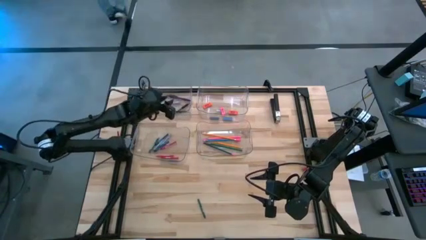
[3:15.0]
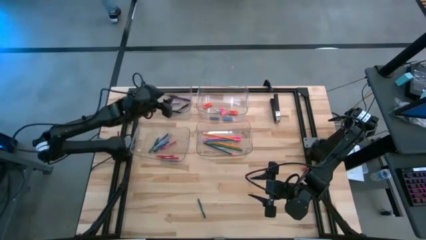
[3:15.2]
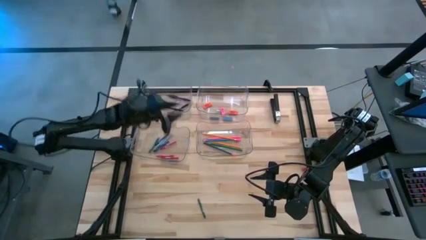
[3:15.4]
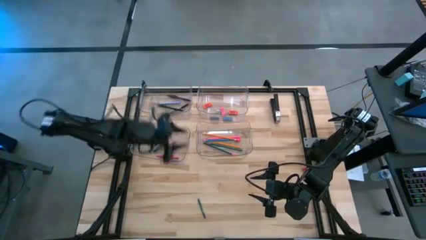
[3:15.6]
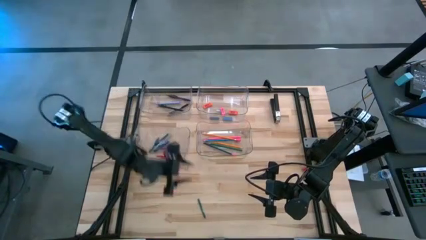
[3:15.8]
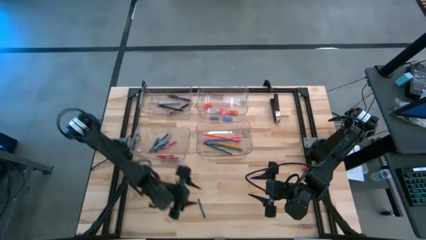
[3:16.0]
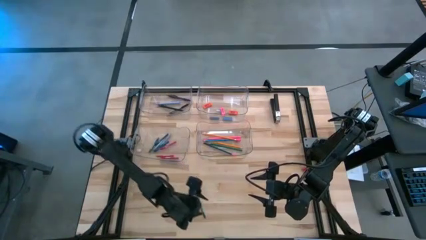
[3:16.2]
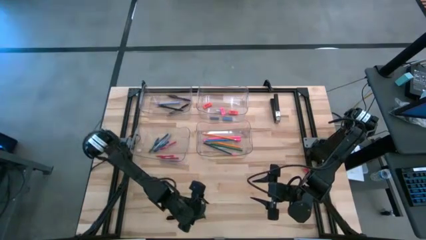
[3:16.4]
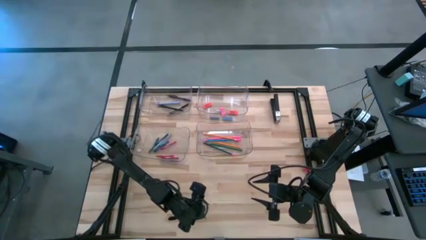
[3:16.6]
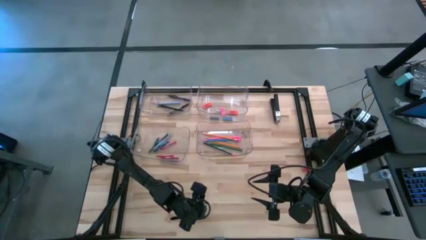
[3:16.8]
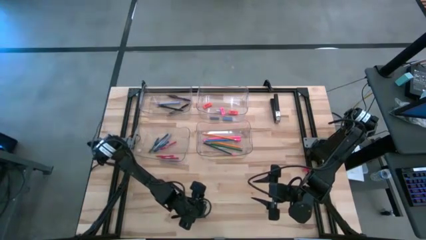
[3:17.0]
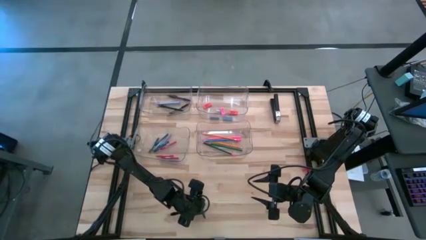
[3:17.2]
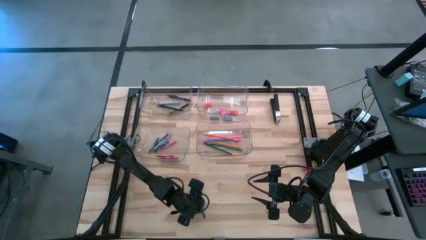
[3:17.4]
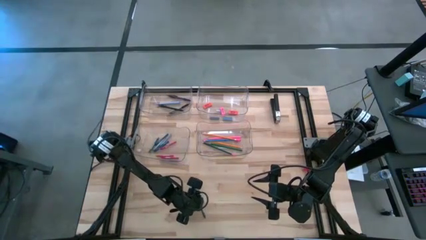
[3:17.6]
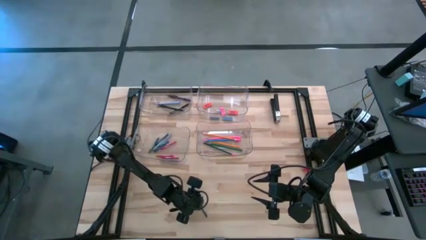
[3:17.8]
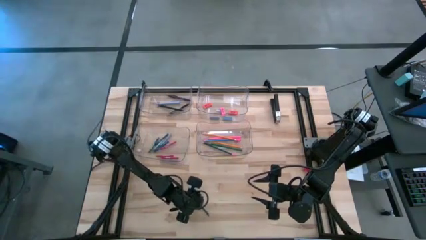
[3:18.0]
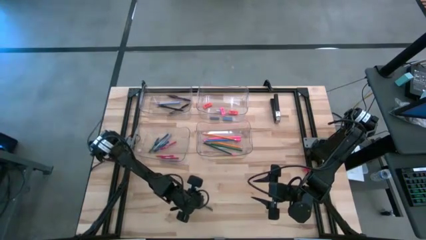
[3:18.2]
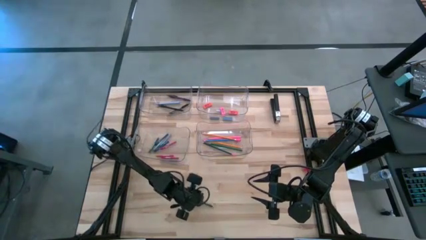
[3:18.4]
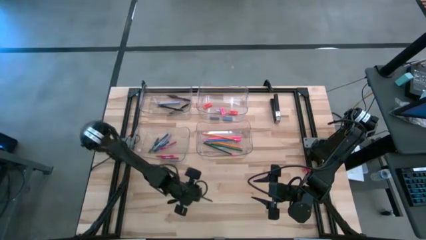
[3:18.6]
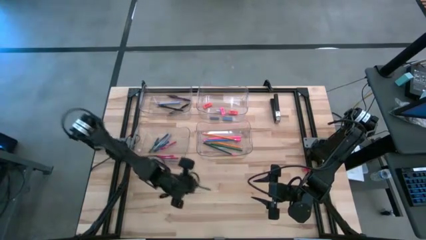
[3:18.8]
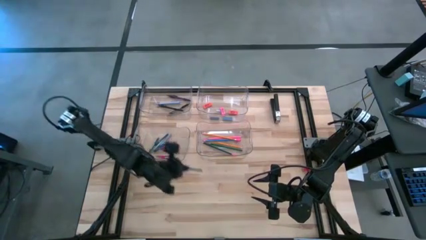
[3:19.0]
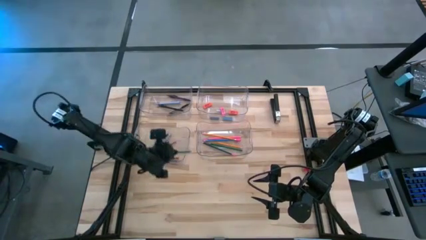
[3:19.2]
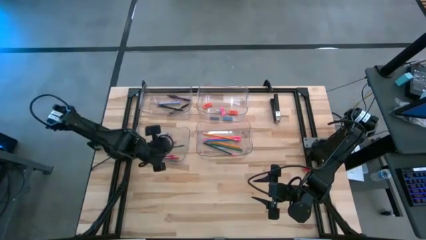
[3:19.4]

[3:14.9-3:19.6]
Task: Sort crayons/erasers/pens/pencils in bins
Put the green crayon into the bottom left transparent bin

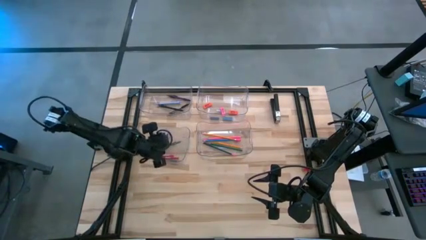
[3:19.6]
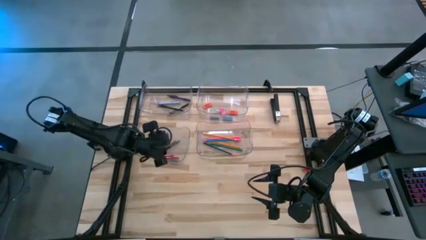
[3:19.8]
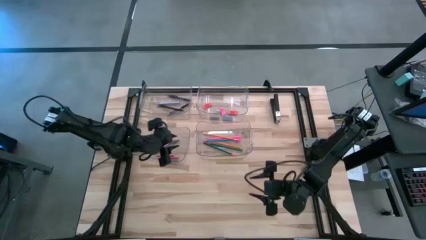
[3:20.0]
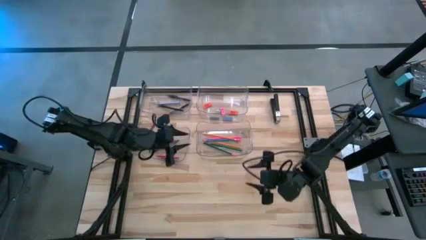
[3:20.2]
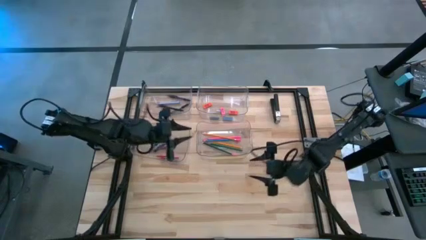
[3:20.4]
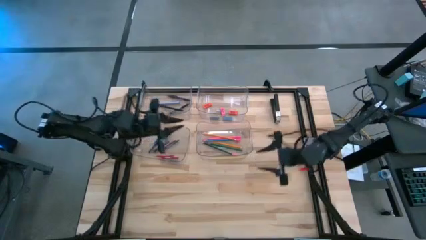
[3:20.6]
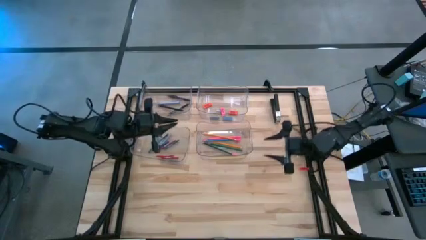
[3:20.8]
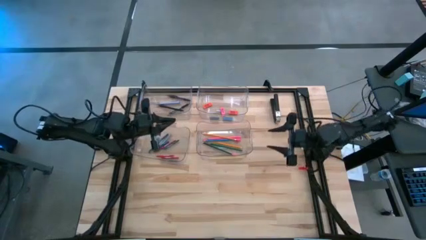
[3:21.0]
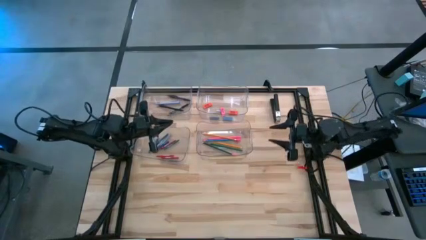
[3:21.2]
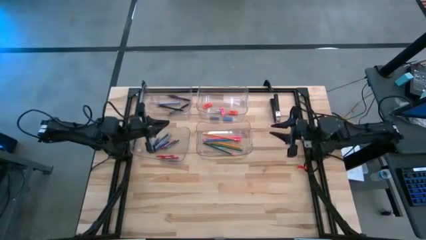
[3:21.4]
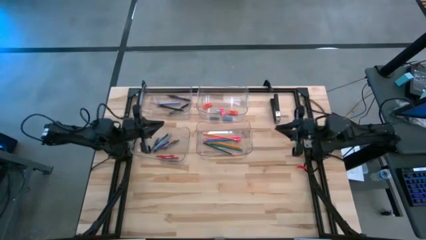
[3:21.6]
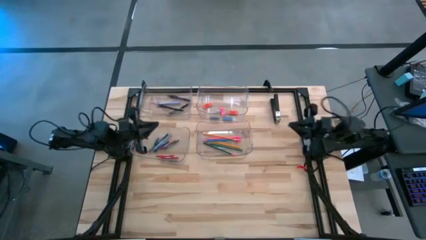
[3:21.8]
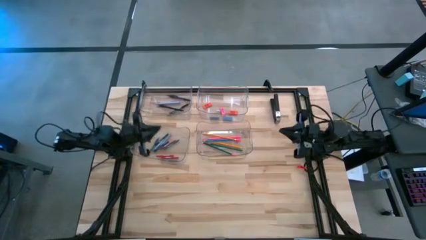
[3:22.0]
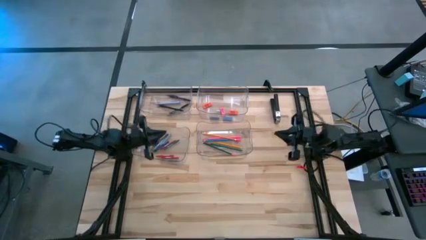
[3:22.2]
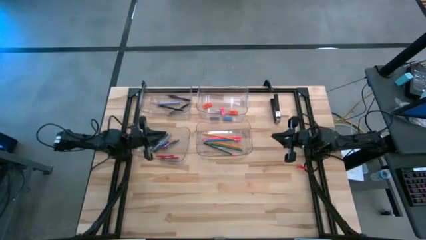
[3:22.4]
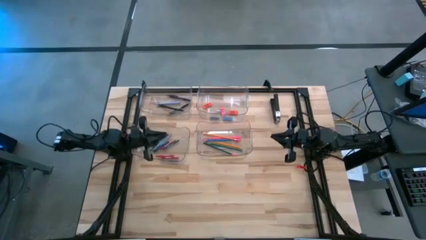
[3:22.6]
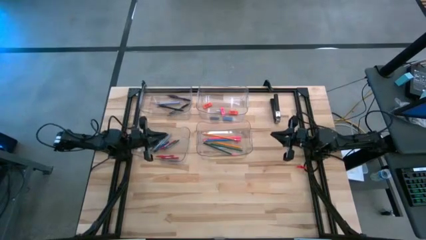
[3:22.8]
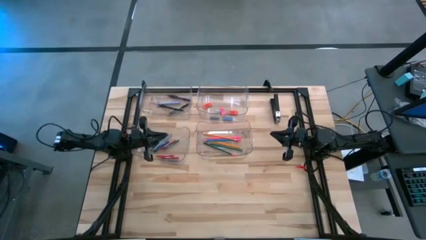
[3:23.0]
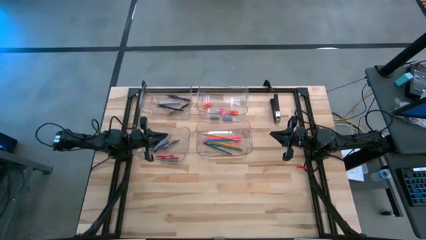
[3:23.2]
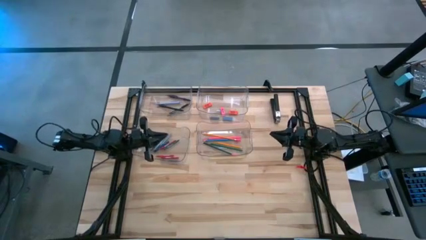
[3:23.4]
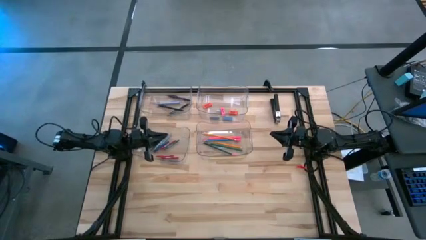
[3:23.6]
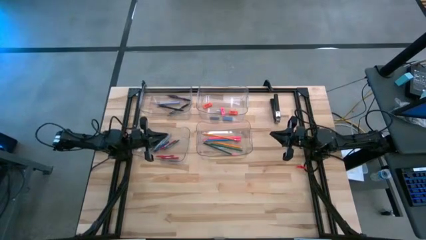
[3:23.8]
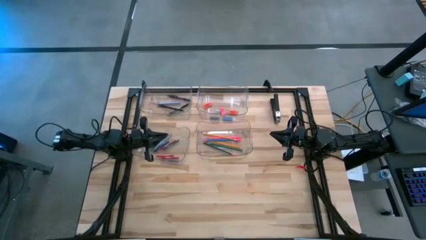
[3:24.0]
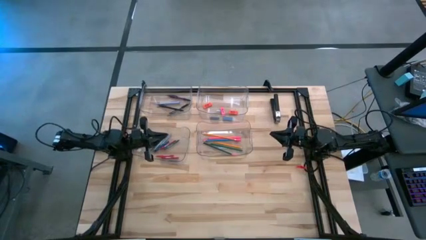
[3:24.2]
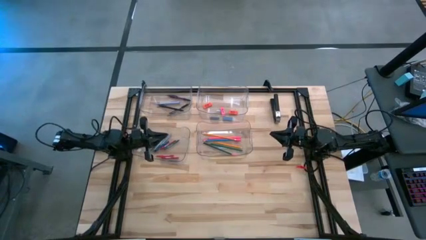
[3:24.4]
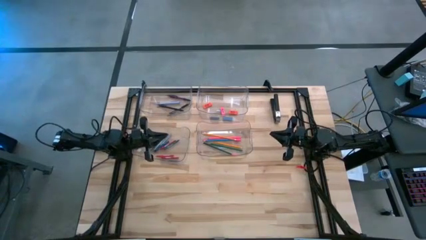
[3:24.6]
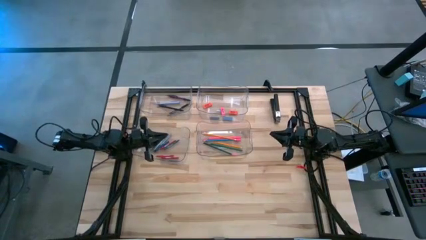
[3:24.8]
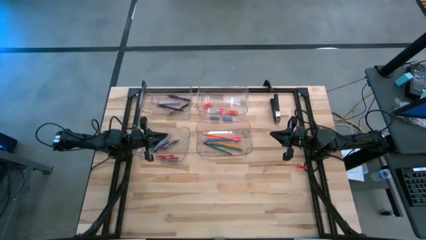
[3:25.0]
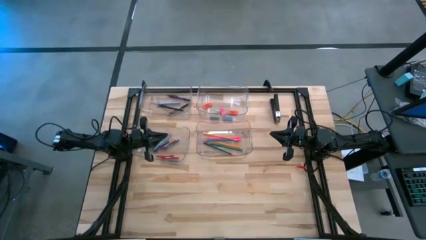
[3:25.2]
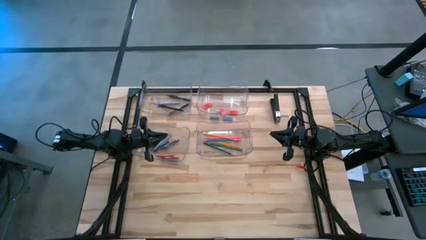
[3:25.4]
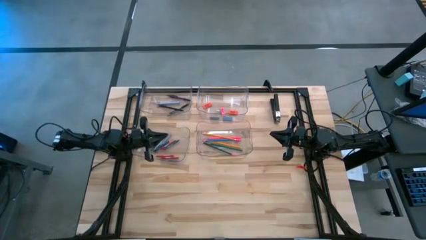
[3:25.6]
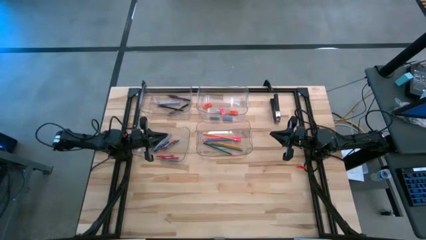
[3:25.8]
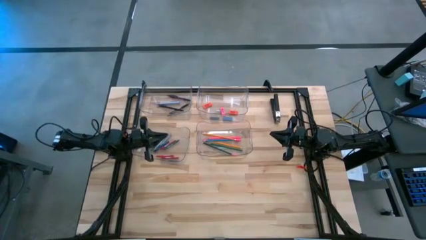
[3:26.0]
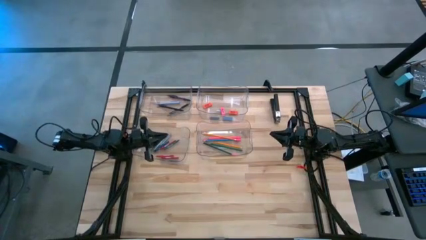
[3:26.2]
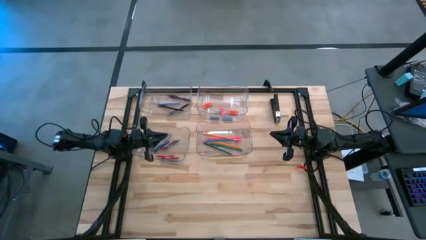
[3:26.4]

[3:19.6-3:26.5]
Return to Home Position

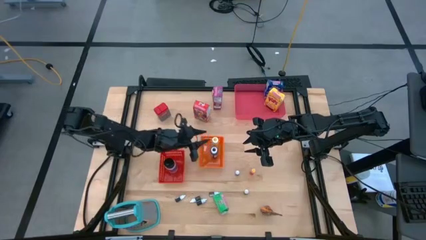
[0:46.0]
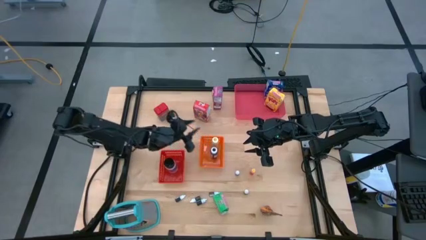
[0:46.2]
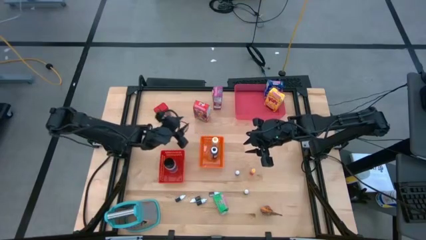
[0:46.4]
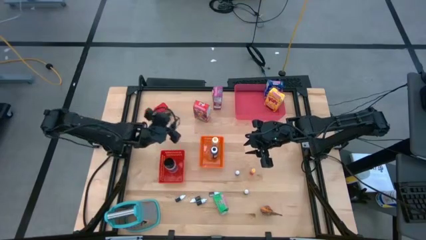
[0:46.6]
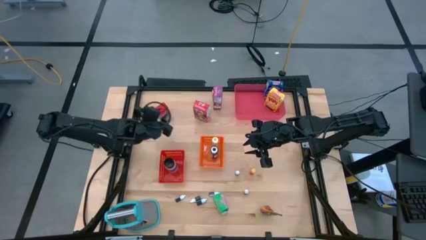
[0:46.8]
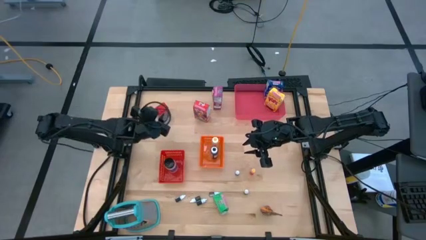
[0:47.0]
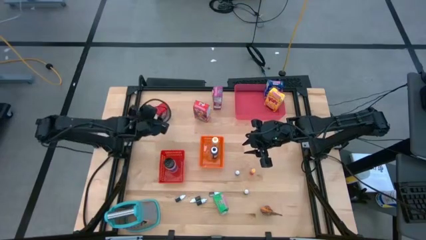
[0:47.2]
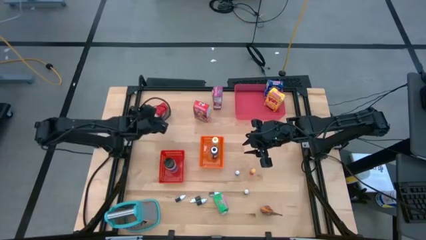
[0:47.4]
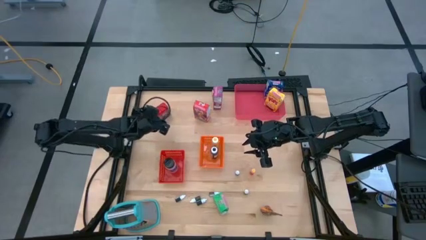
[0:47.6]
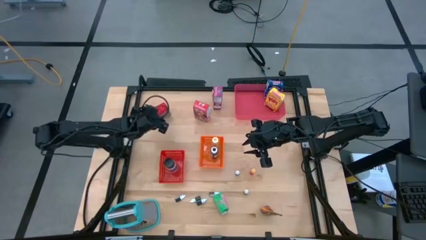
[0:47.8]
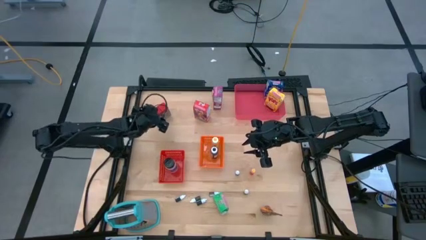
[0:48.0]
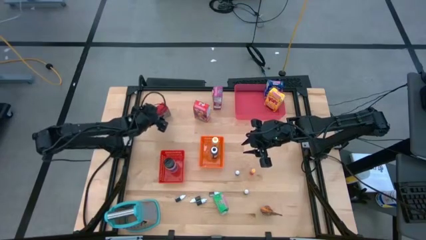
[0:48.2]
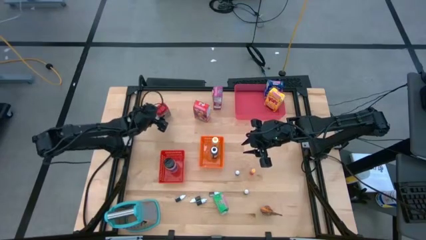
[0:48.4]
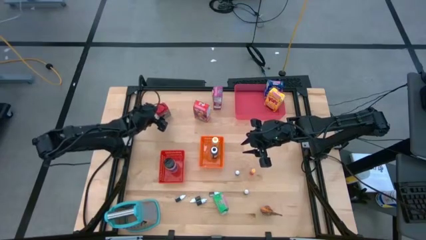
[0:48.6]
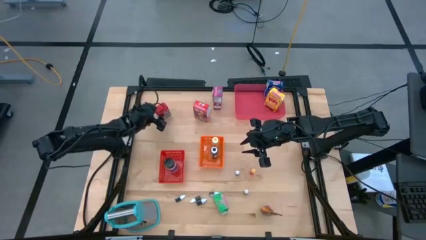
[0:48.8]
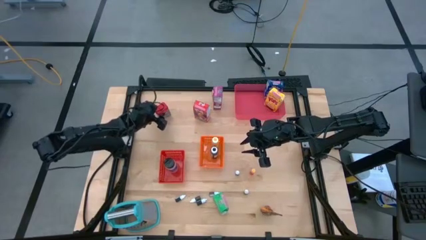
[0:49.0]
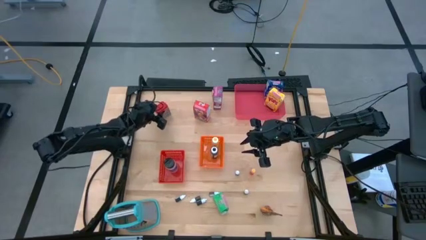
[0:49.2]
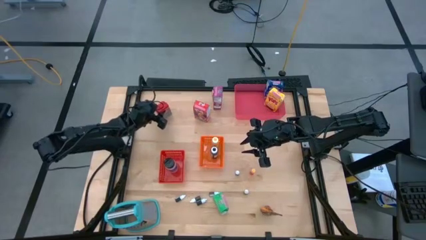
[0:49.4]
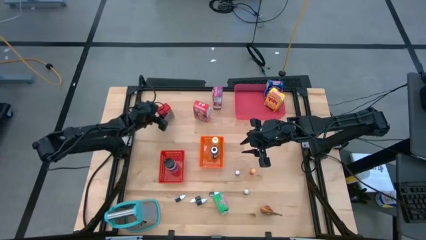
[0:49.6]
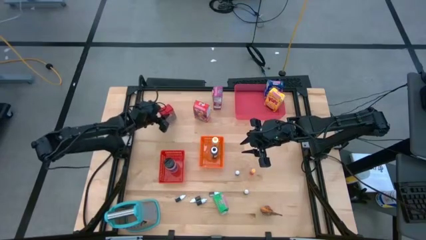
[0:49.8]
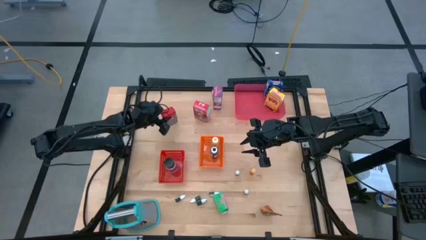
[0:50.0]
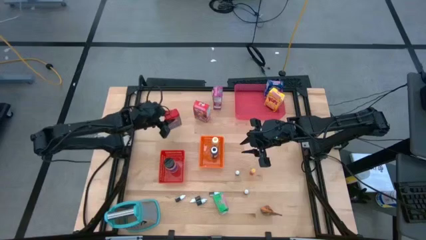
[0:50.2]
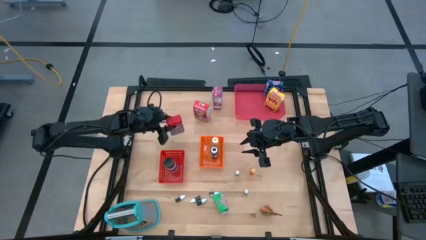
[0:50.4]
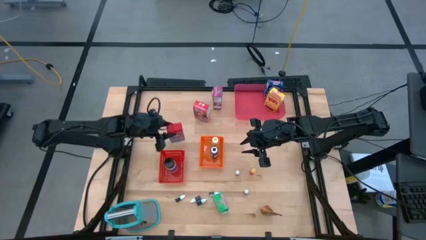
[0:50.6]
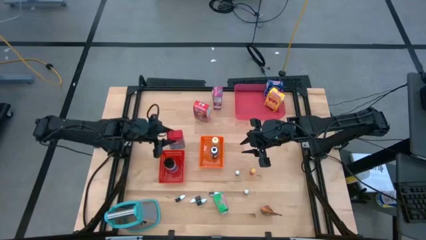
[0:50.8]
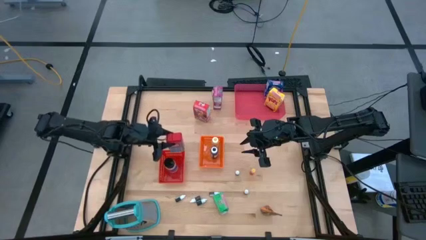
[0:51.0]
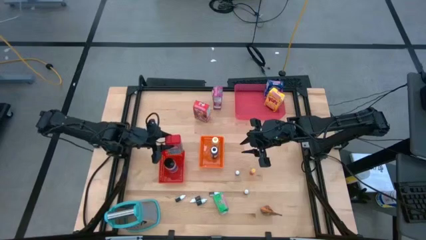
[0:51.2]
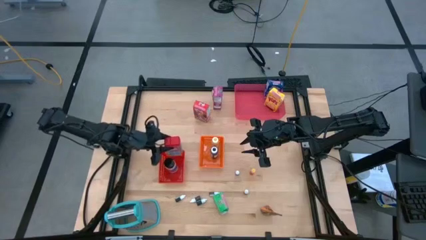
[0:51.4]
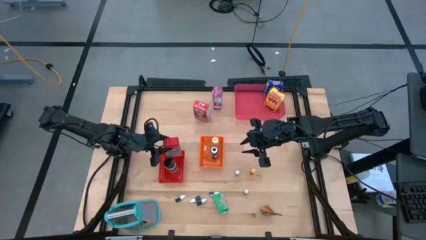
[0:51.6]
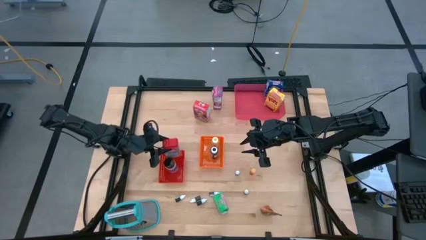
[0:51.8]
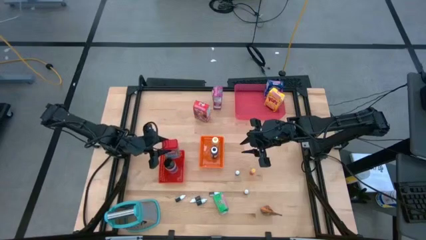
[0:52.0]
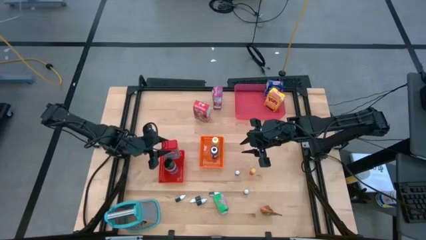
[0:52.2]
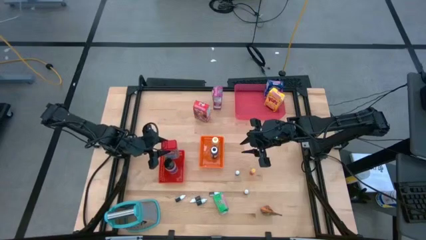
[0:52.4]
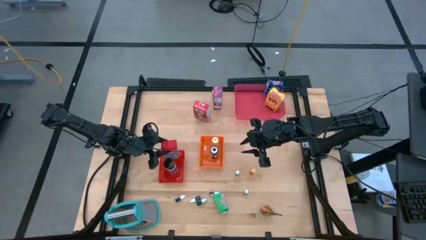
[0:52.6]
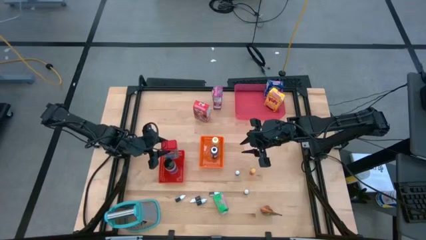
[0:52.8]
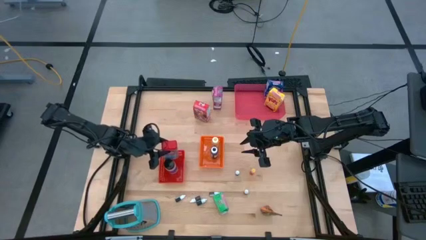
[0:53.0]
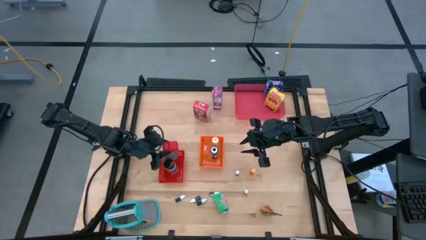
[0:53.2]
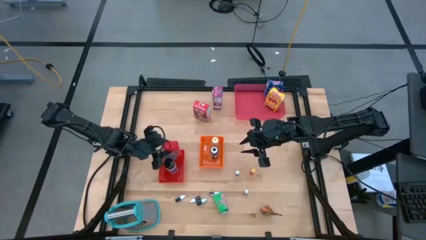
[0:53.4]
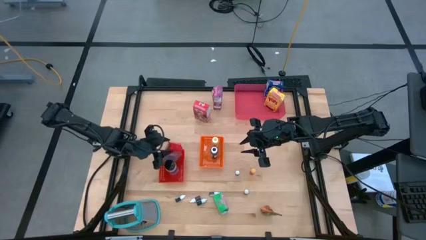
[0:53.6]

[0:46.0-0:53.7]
Task: Pick & Place Kitchen Items
Put the red seasoning can into the red bin
